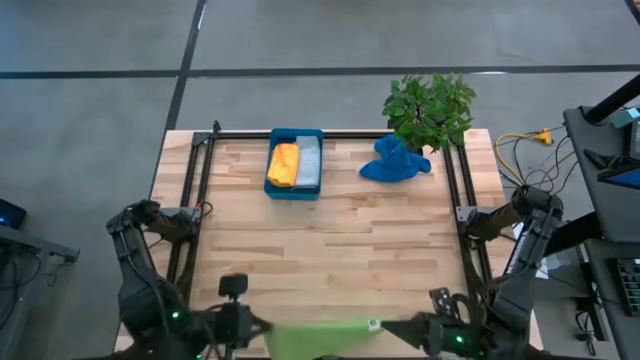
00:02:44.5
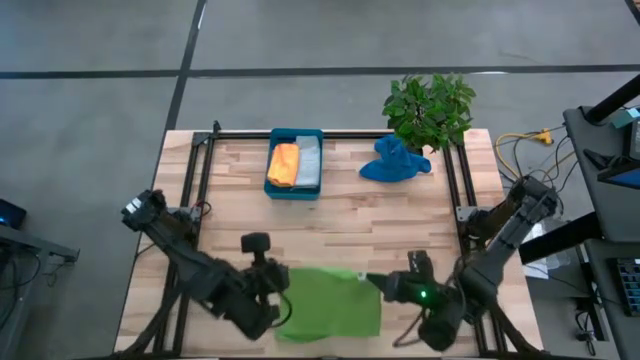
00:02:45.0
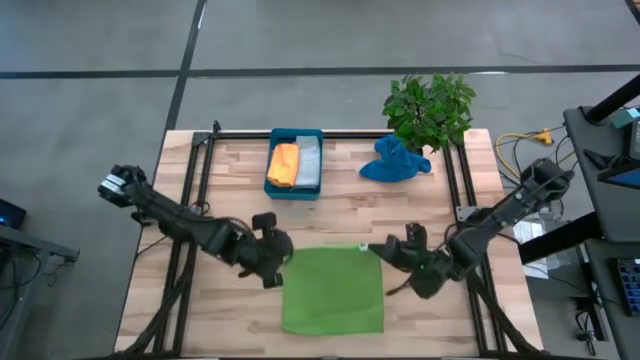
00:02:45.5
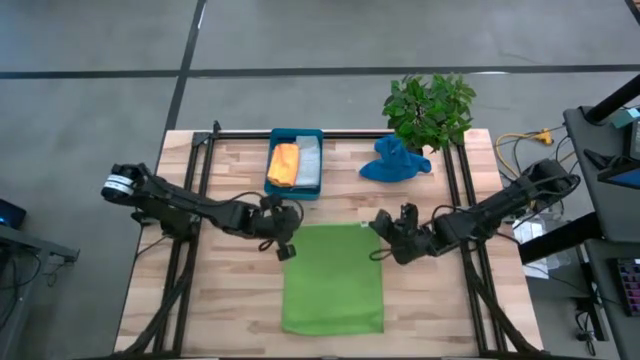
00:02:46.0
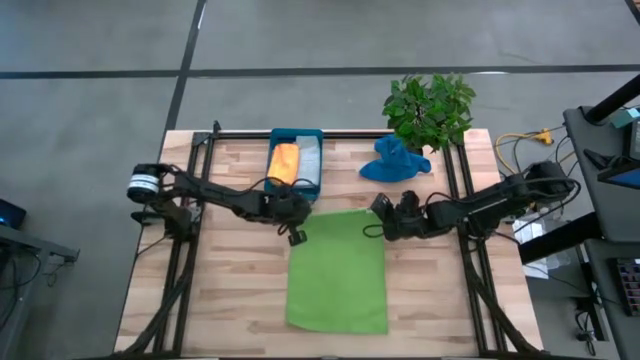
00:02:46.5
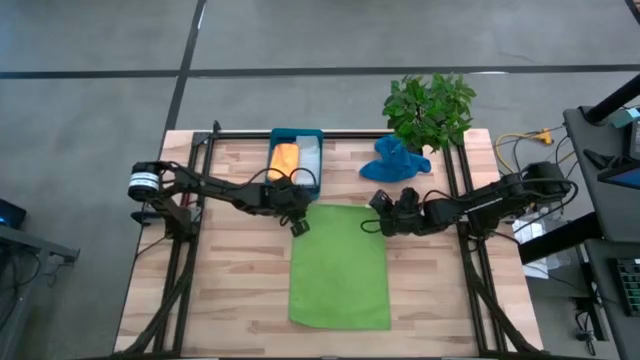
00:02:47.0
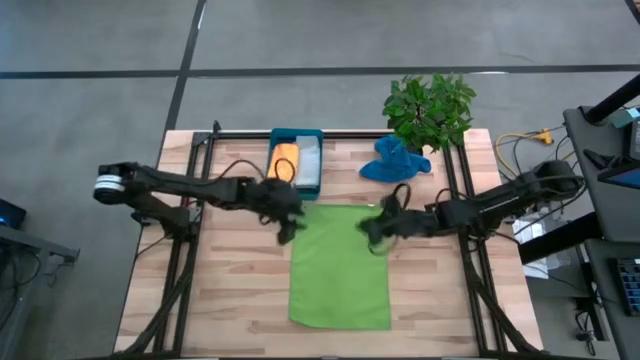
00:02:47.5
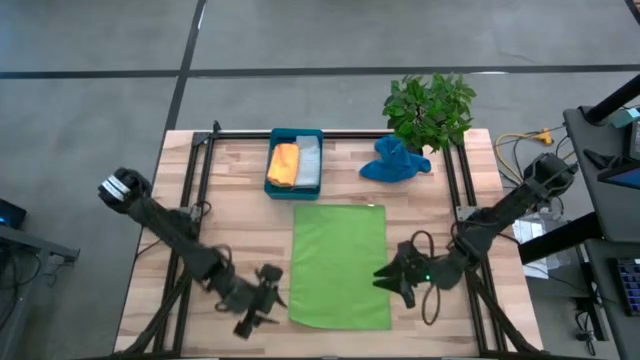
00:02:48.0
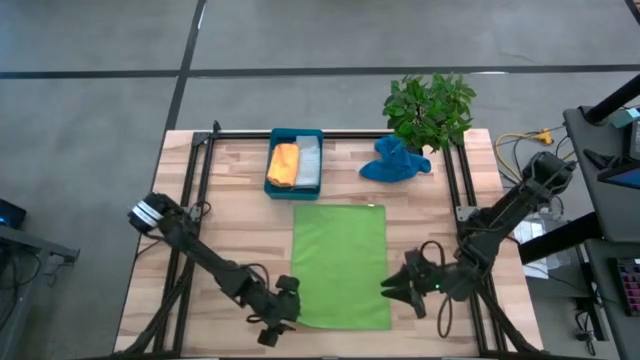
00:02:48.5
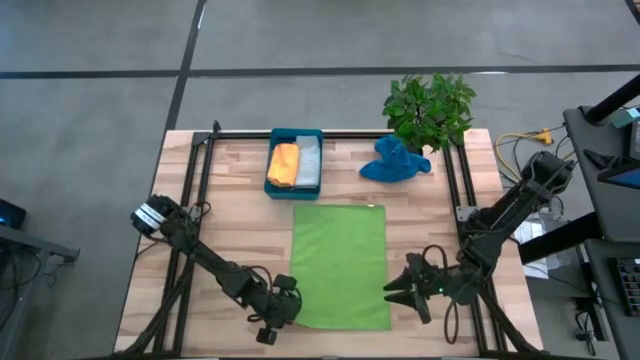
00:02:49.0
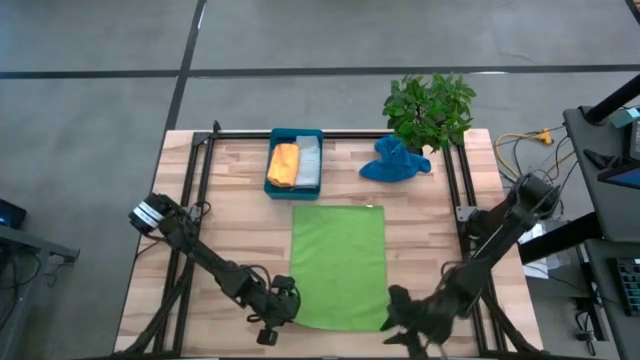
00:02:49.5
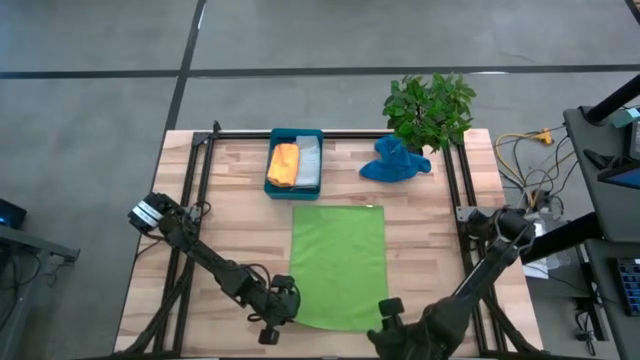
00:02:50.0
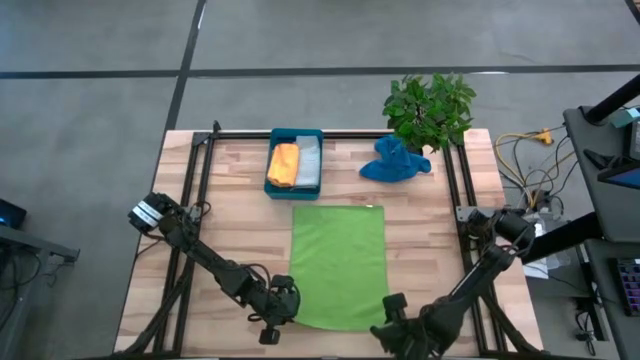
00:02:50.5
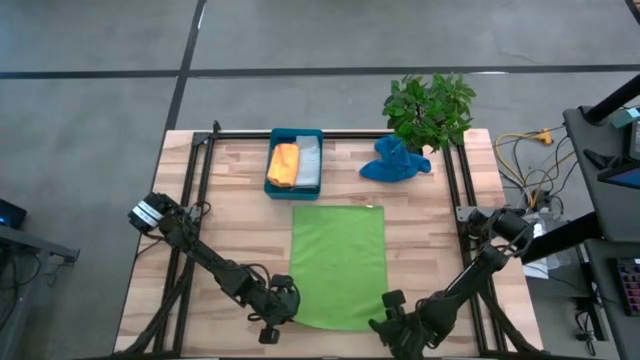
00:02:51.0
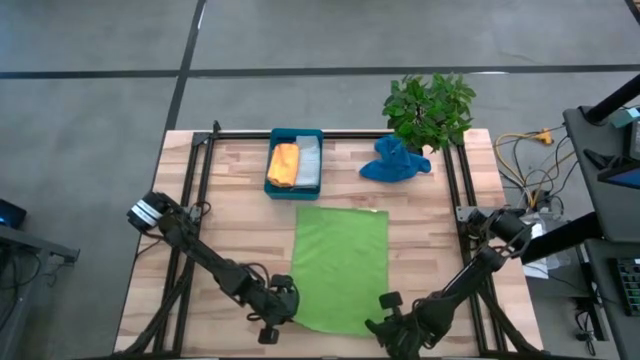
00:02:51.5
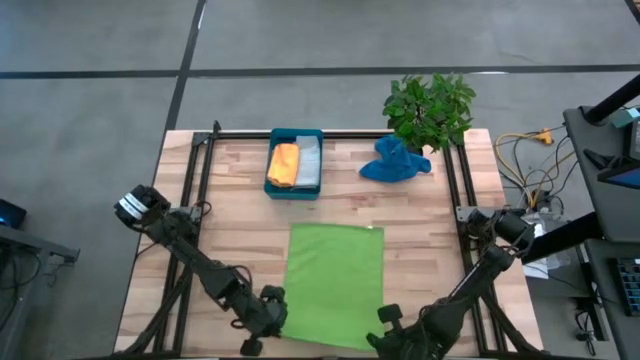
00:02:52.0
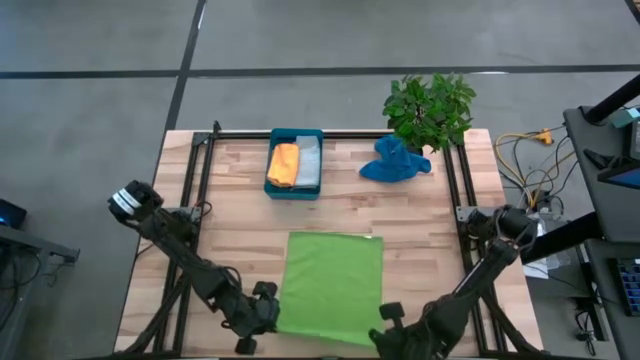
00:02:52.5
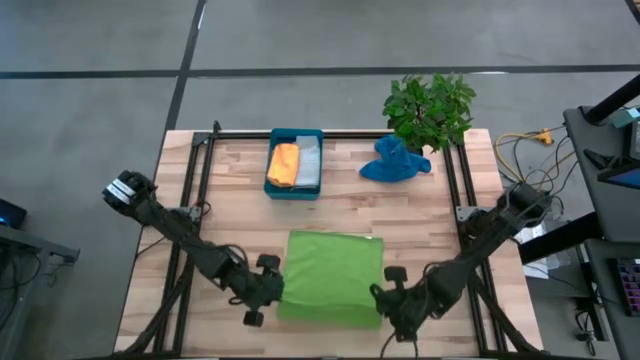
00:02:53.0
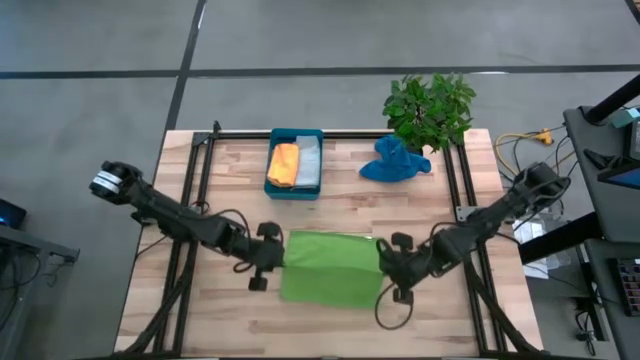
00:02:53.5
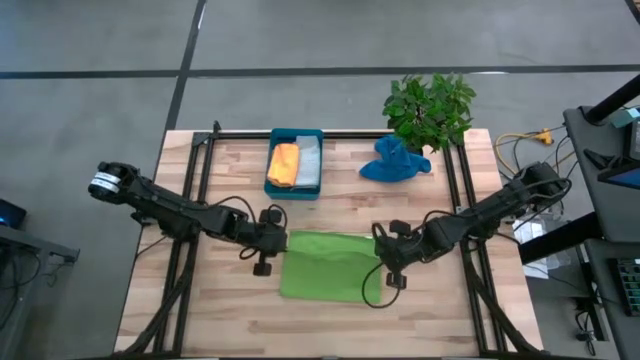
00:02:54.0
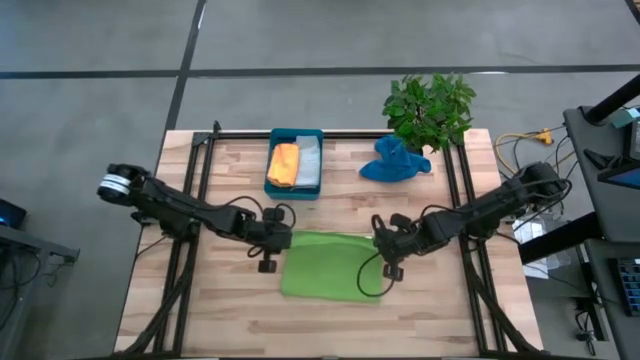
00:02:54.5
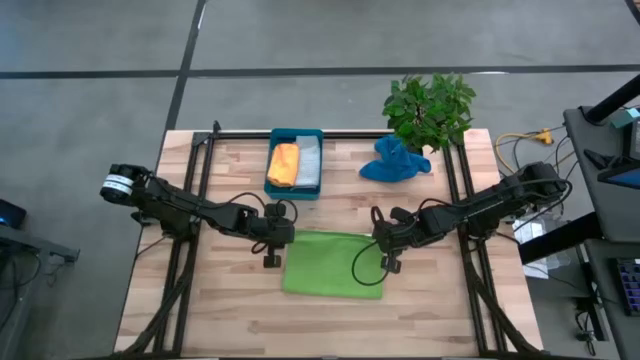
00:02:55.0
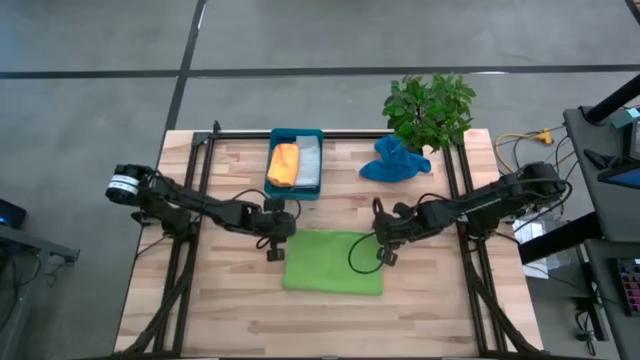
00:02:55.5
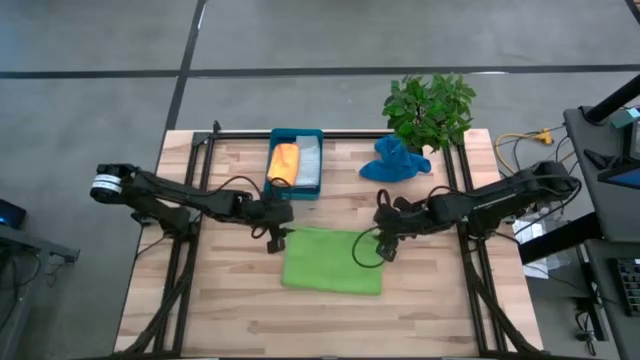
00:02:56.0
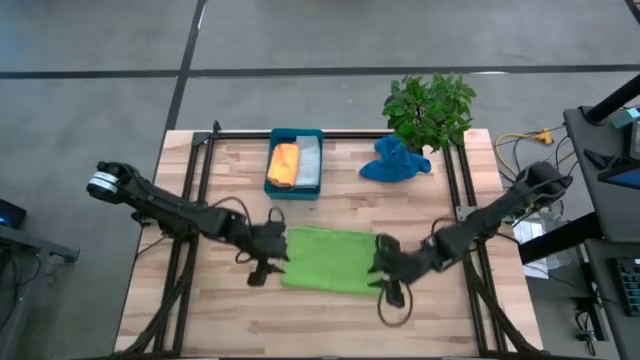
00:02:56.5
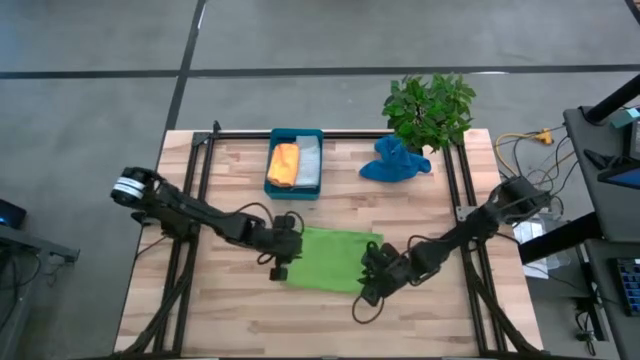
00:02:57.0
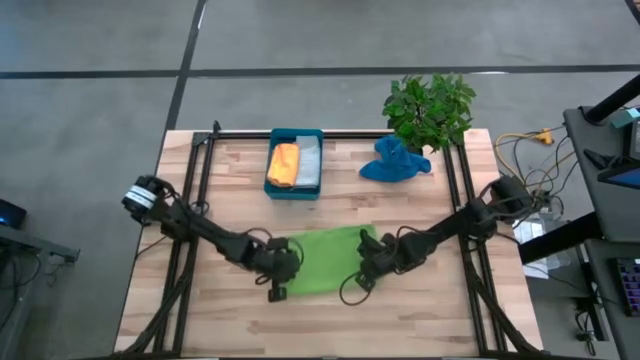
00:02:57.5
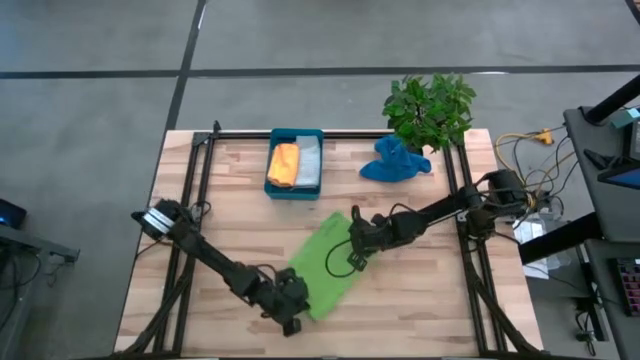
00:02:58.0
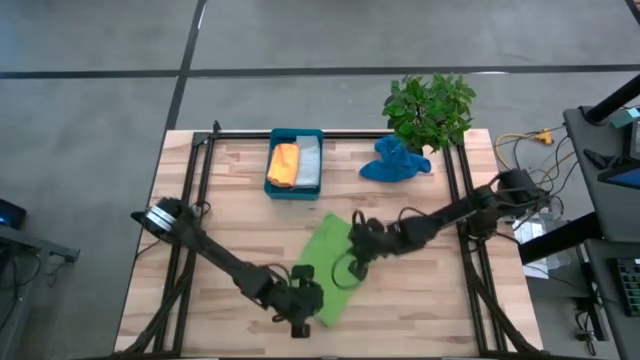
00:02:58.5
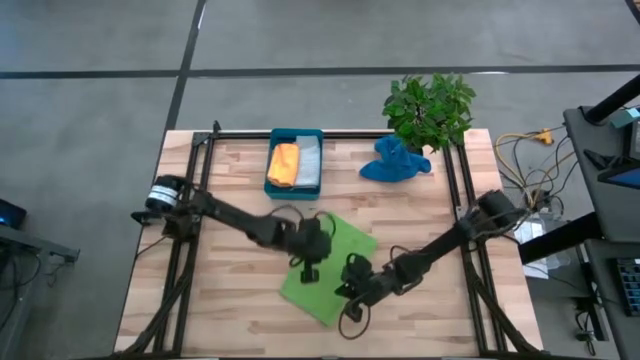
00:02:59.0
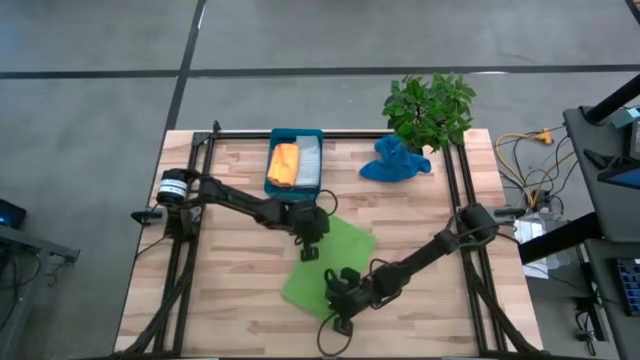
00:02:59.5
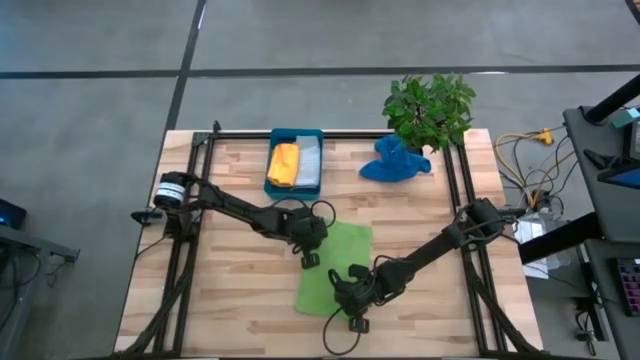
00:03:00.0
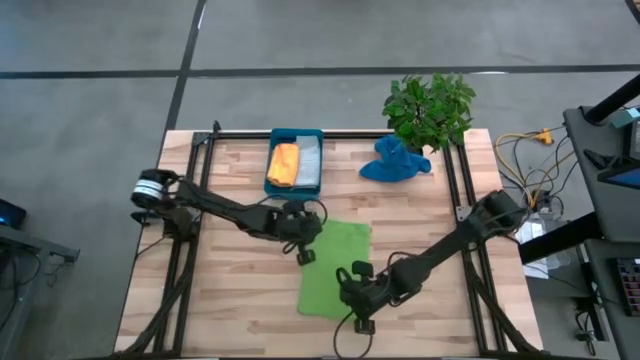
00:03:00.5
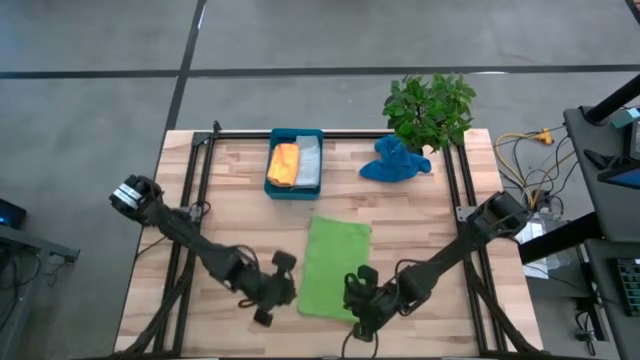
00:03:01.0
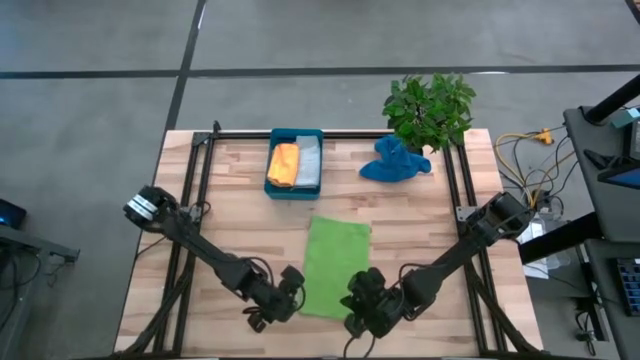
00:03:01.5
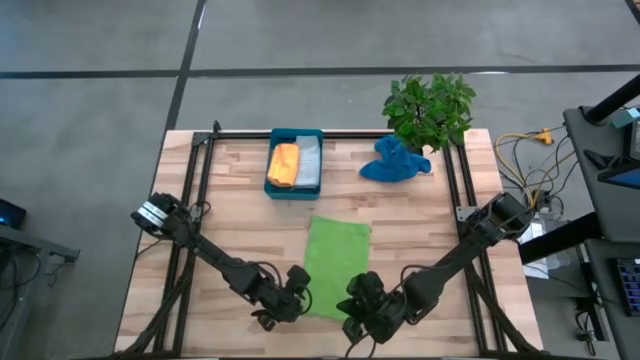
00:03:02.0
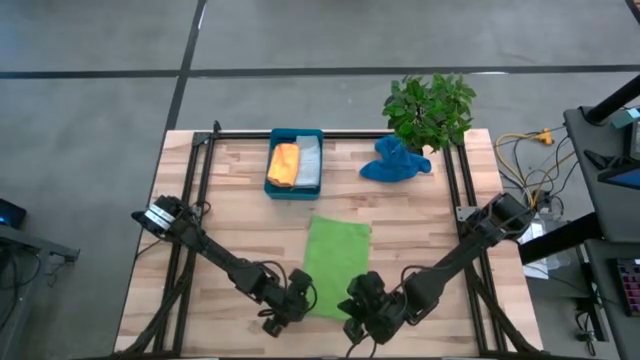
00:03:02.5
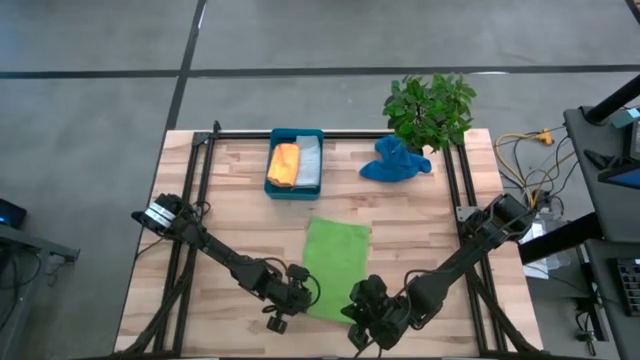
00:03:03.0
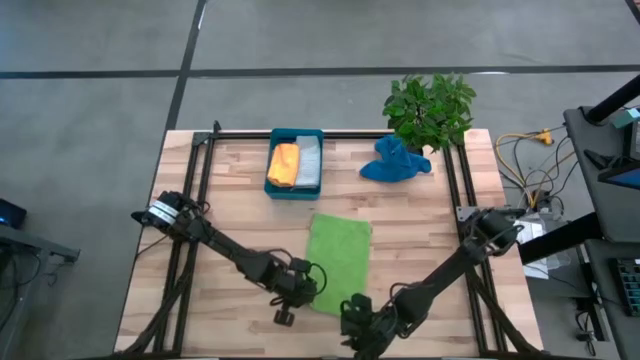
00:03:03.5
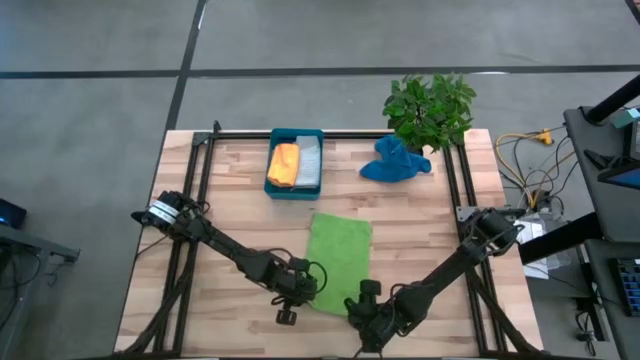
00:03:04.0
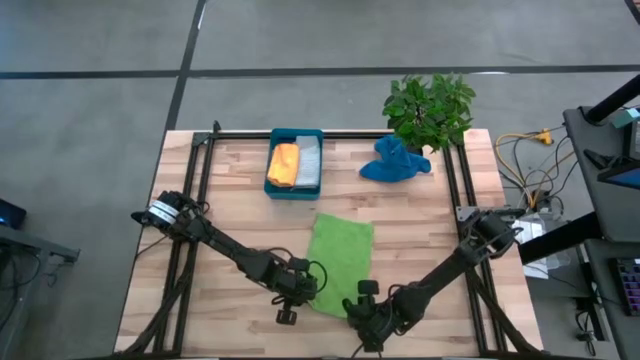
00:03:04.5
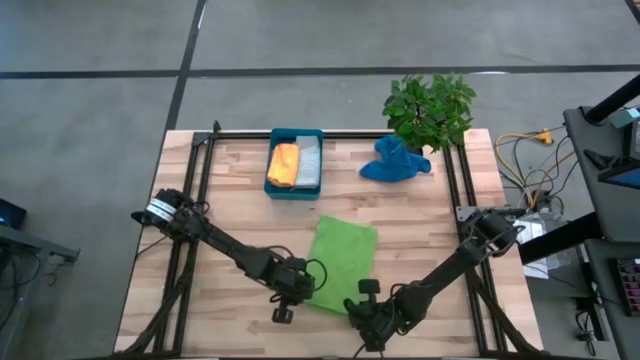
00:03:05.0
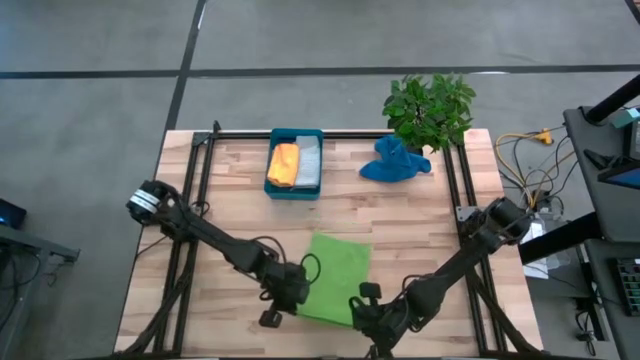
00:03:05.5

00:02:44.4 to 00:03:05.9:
Task: Fold microfiber towels
Fold the green microfiber cloth
